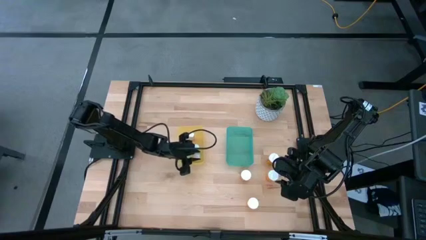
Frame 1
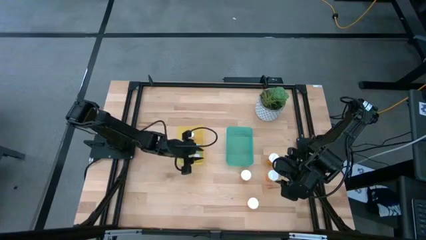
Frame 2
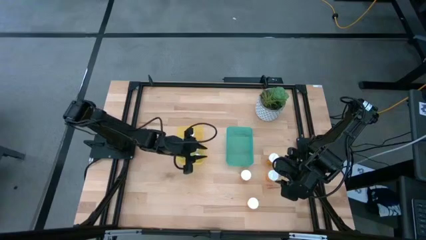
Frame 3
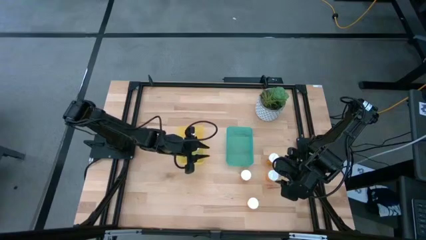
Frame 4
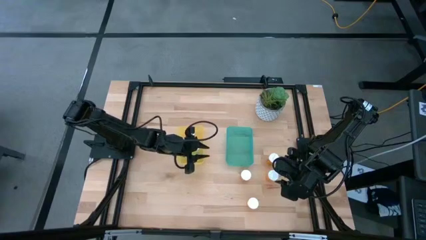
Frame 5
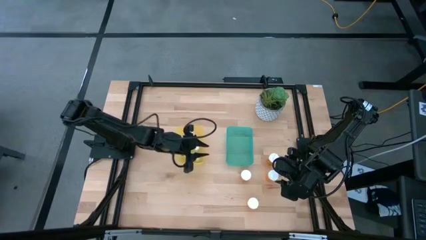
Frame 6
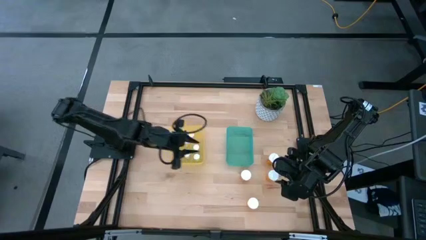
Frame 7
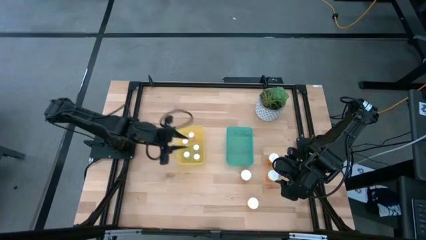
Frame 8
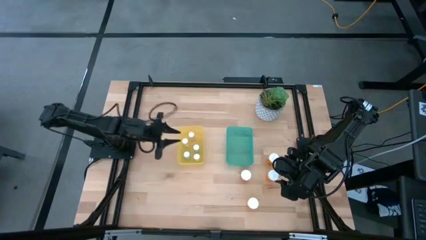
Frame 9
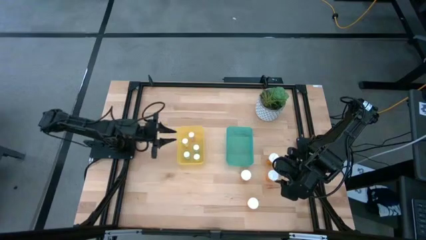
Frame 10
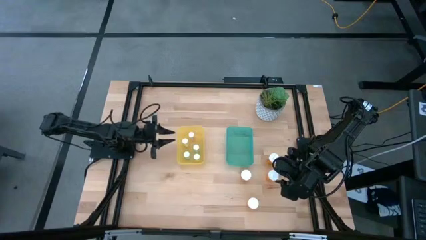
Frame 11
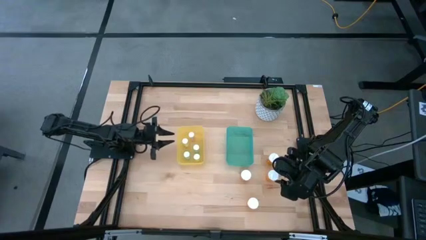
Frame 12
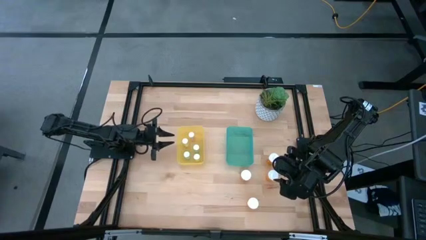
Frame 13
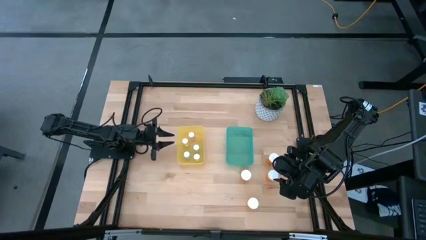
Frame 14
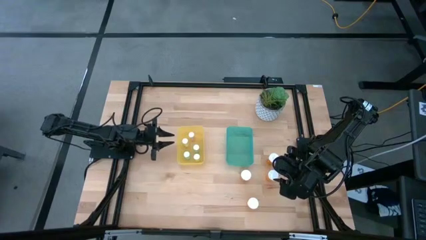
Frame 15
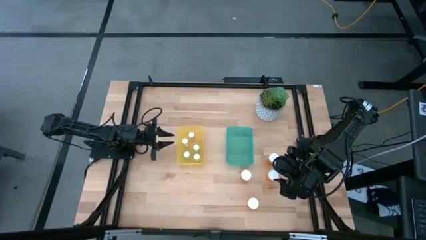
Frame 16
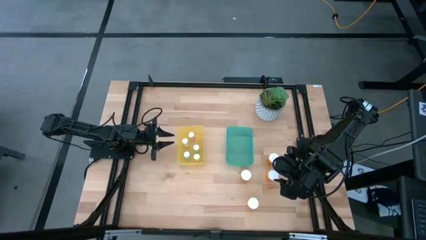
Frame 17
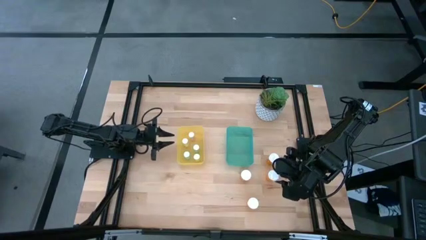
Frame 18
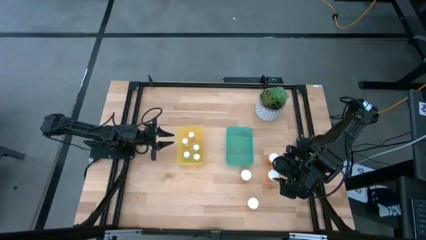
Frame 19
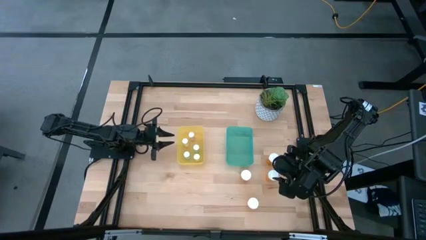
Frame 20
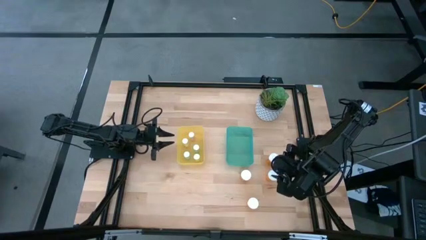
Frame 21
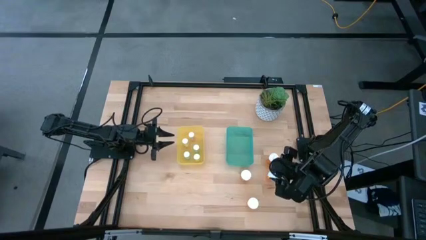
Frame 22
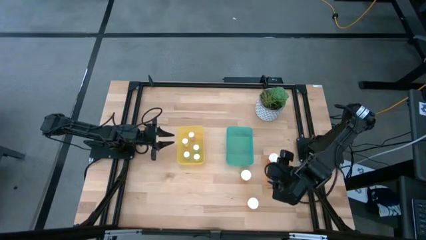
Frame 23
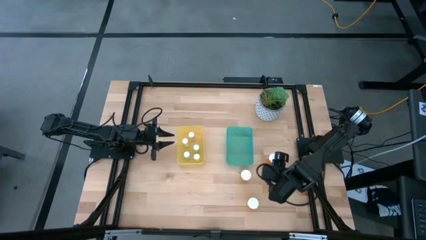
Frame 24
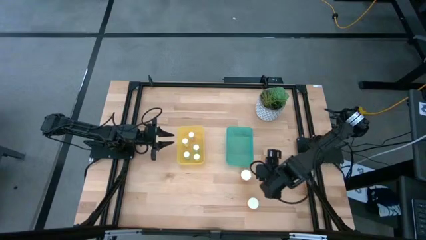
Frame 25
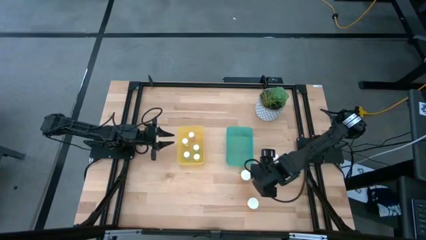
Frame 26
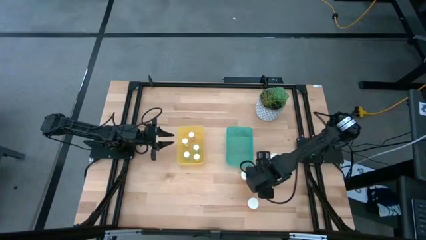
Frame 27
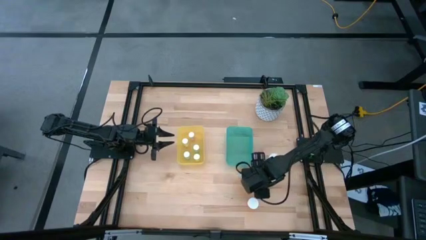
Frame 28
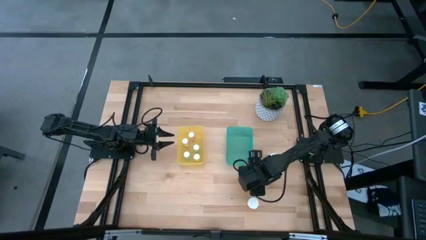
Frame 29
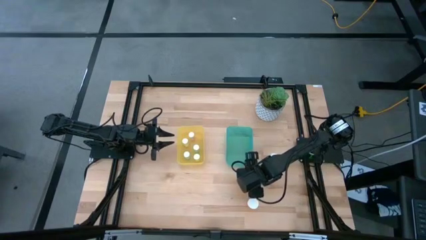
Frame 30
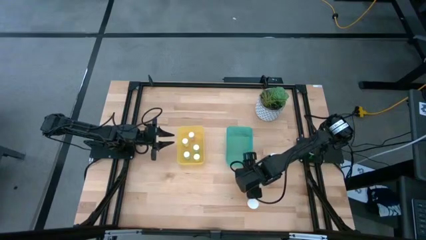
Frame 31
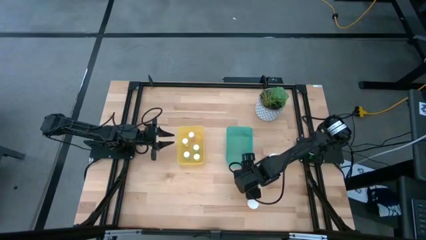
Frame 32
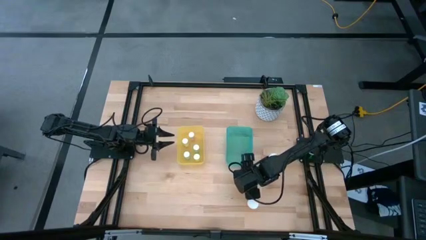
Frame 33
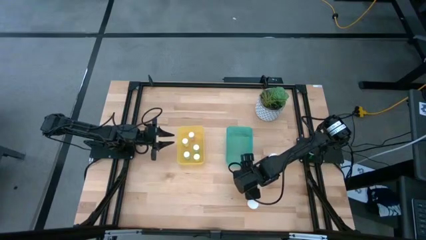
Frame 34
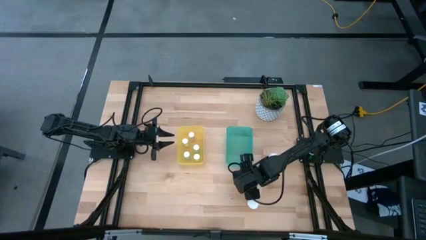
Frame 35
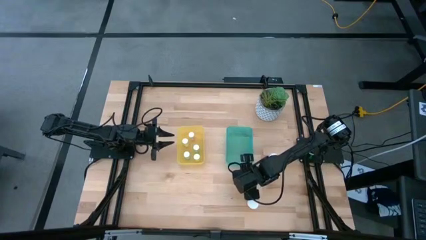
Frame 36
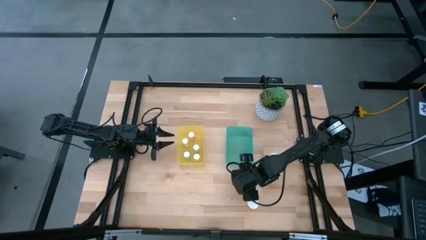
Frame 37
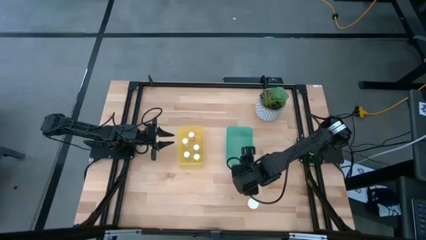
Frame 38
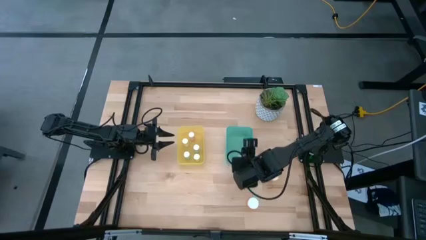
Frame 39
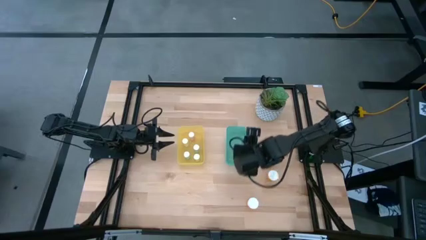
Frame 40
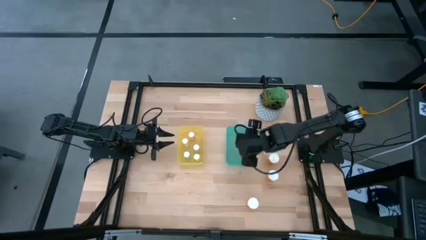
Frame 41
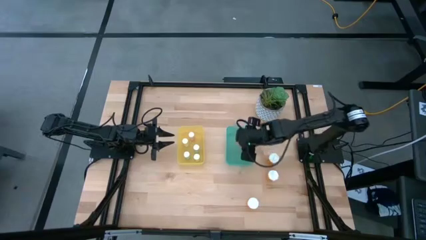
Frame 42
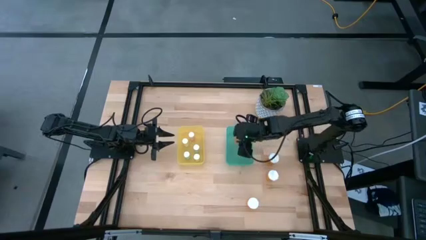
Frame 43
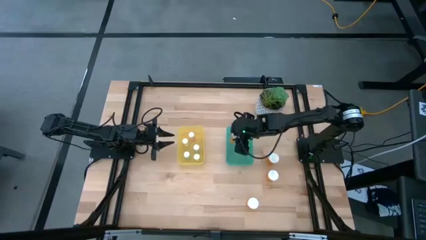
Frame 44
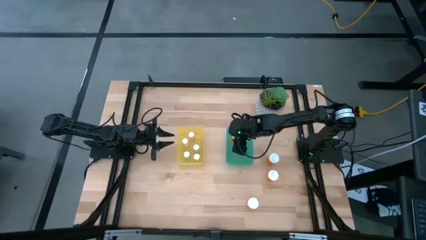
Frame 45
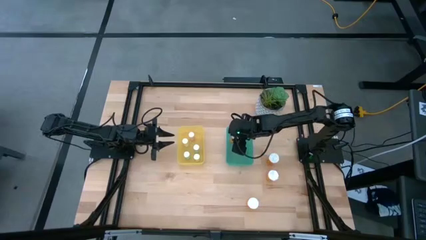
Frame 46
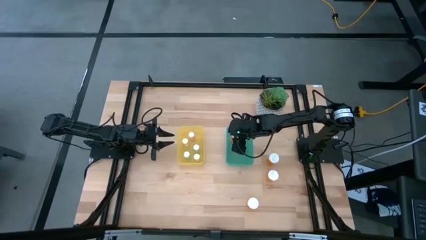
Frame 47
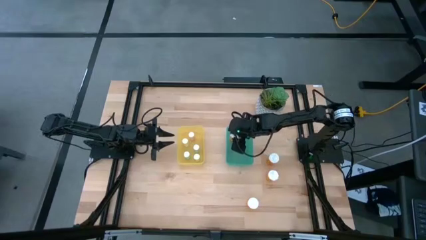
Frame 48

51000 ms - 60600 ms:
Task: Pick and place medicine bottles into bin by pill shape (circle, oval)
Put the large orange pill bottle into the green bin

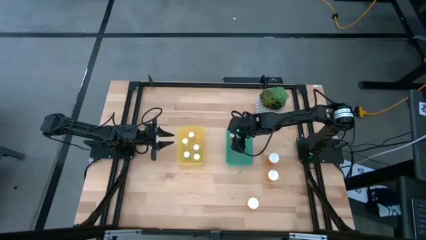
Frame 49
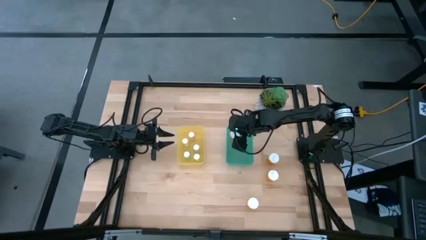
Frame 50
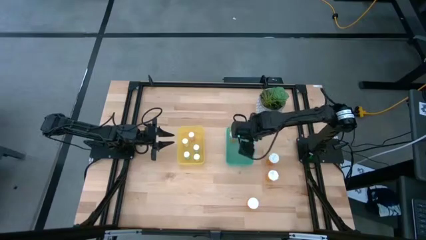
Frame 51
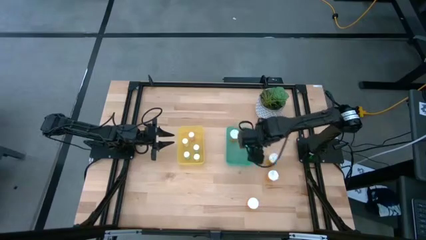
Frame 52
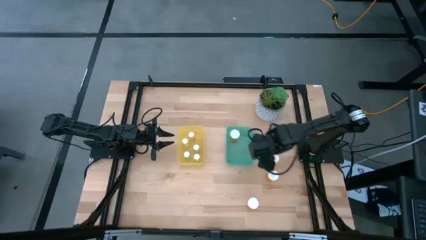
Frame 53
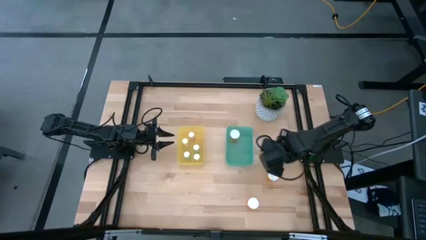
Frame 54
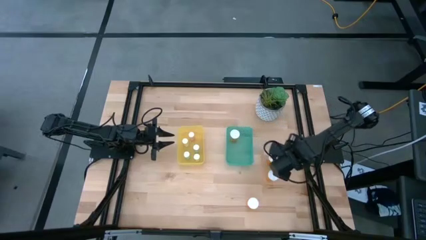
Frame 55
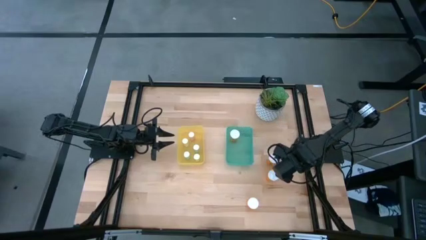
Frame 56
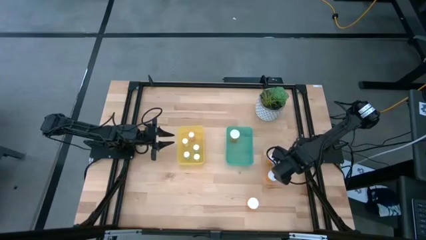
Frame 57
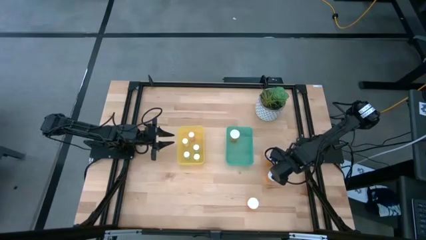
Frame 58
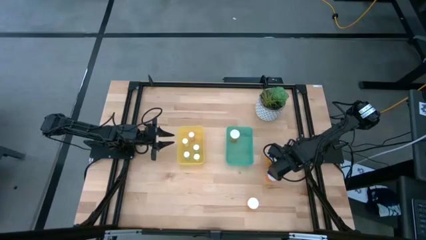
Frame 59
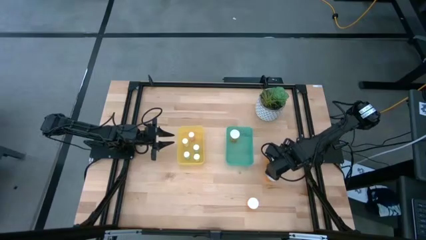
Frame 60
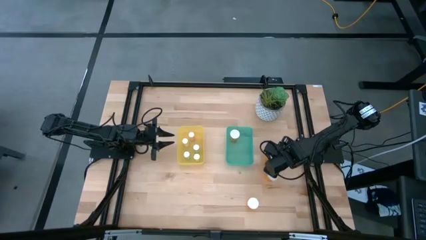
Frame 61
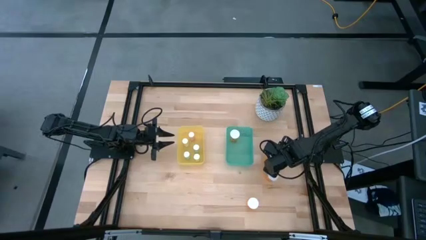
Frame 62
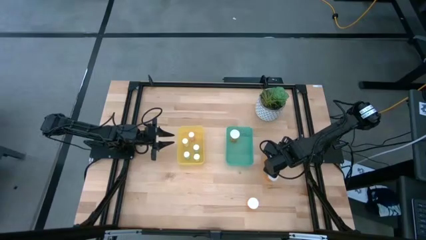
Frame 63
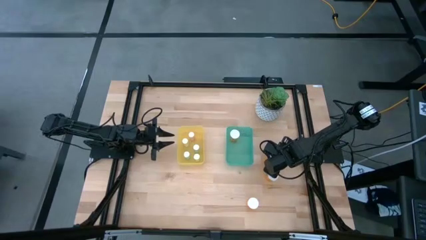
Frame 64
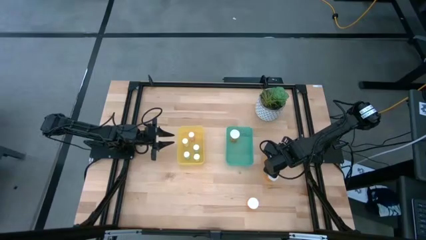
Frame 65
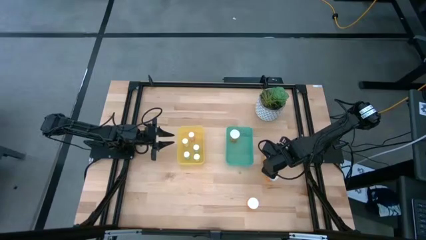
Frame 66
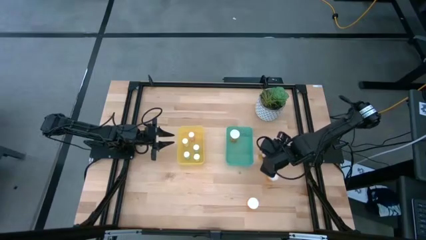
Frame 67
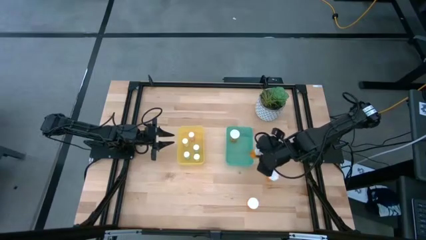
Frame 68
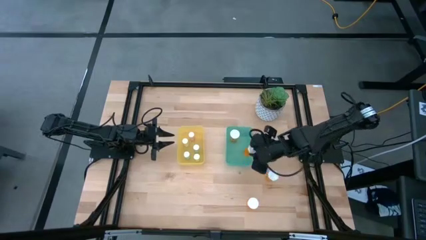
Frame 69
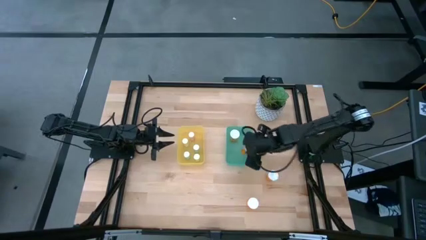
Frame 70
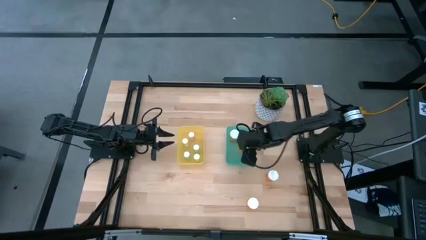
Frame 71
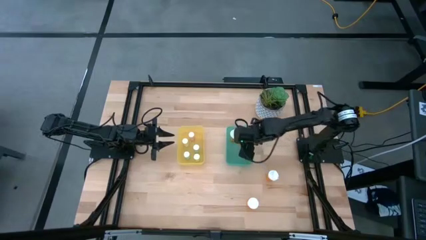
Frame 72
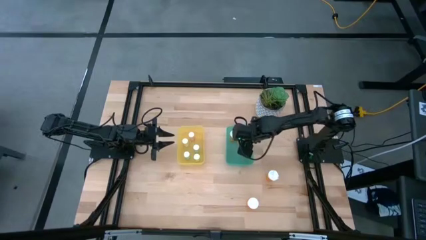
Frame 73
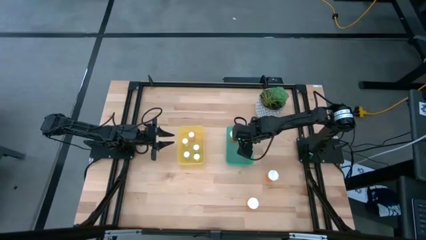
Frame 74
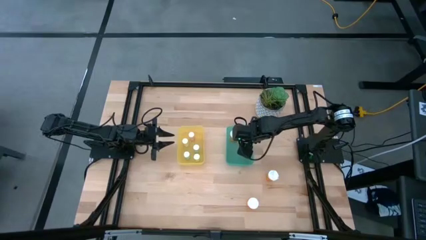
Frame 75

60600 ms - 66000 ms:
Put the large orange pill bottle into the green bin
